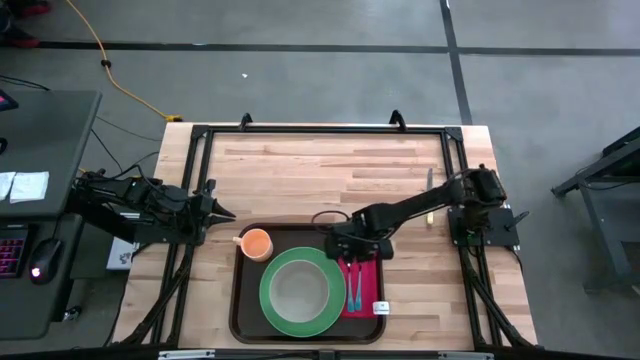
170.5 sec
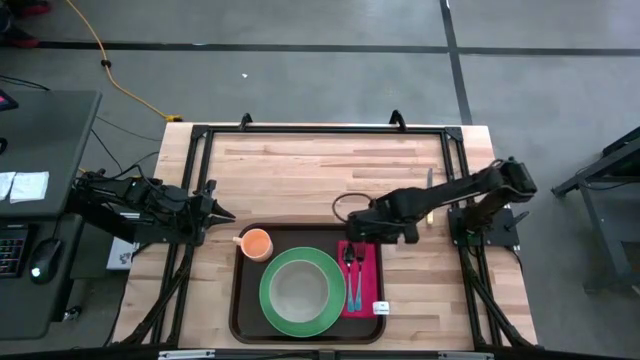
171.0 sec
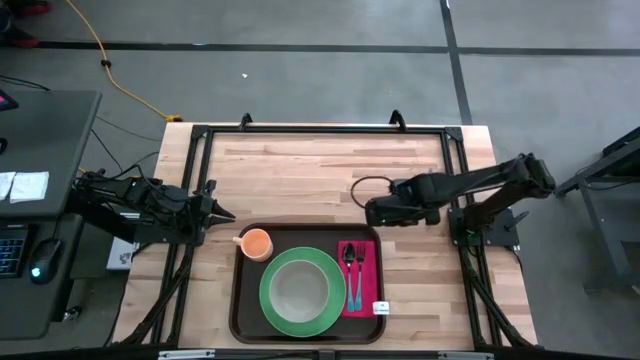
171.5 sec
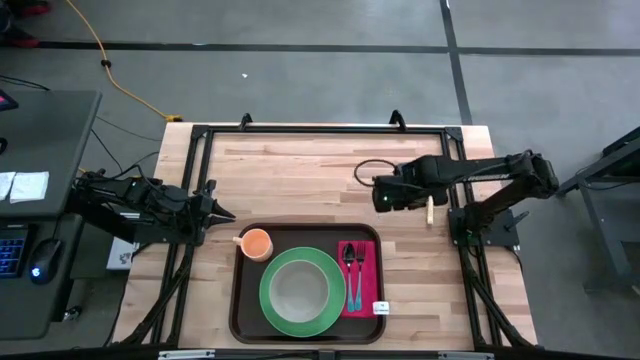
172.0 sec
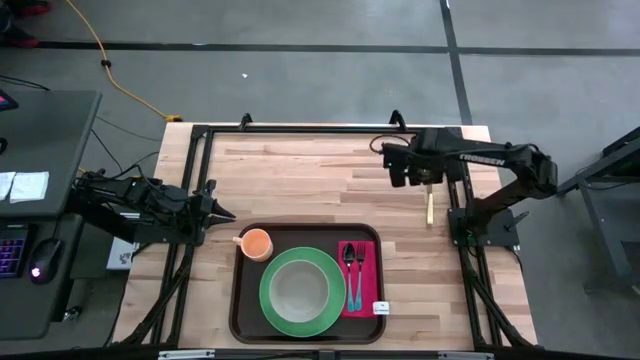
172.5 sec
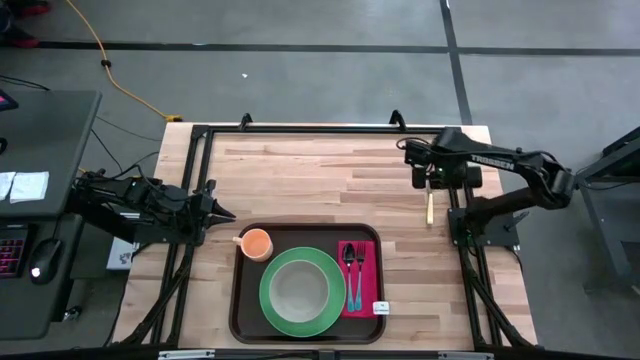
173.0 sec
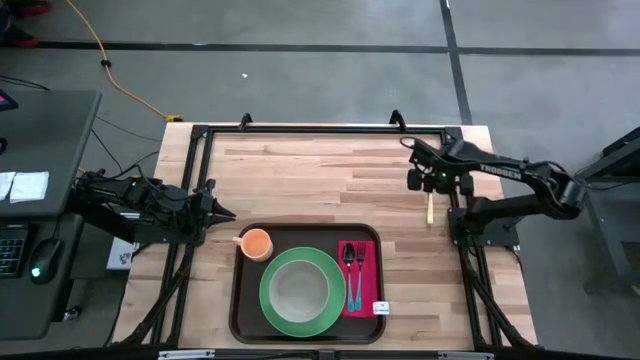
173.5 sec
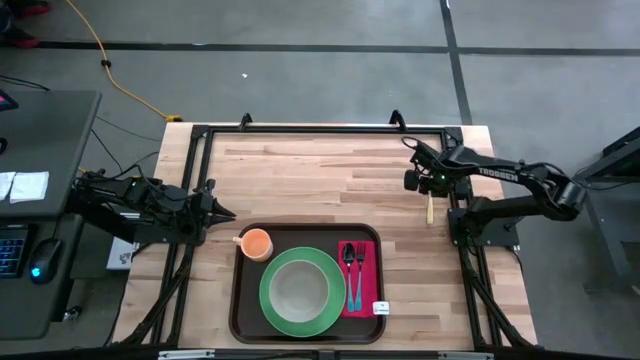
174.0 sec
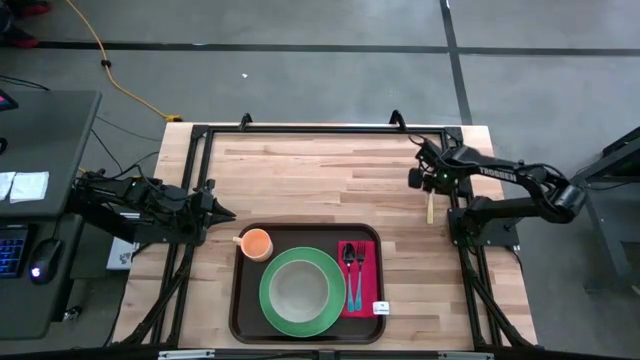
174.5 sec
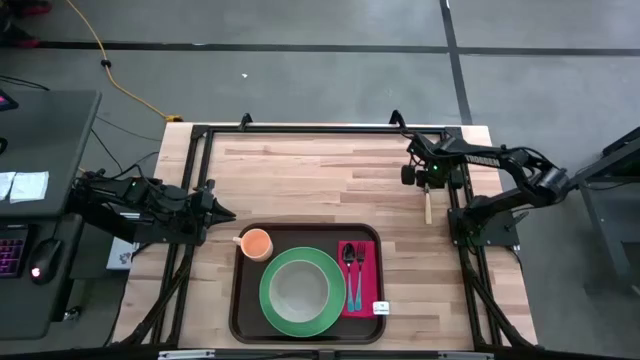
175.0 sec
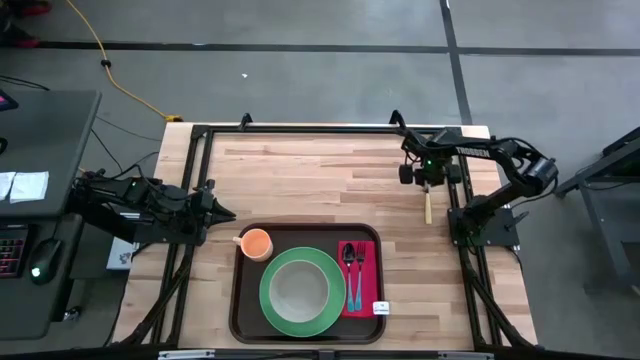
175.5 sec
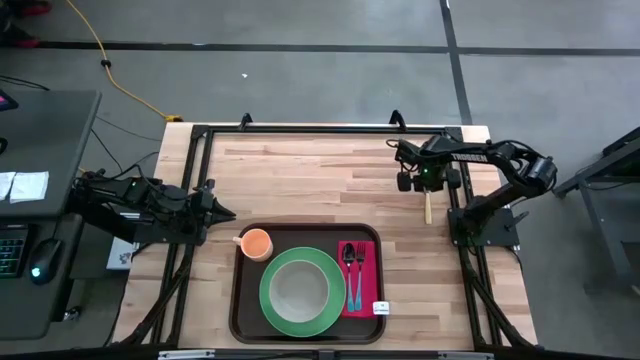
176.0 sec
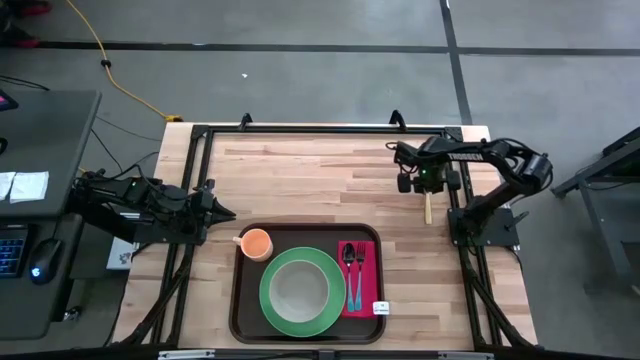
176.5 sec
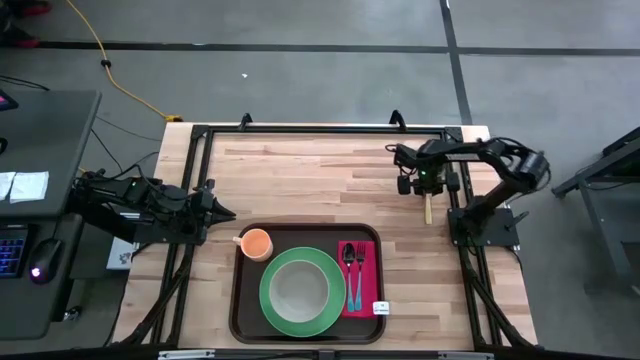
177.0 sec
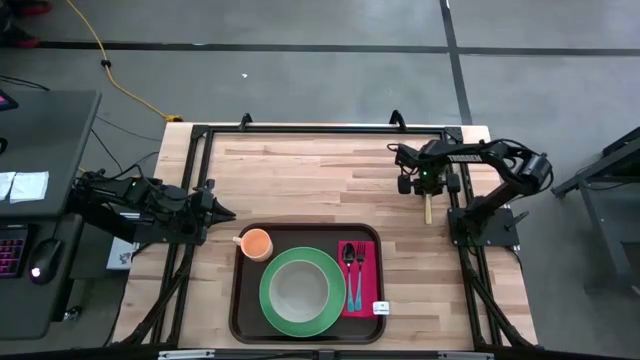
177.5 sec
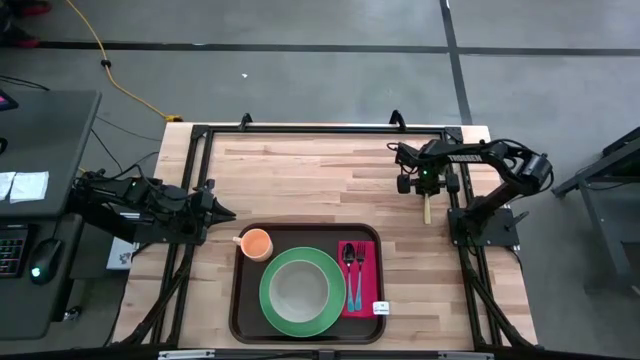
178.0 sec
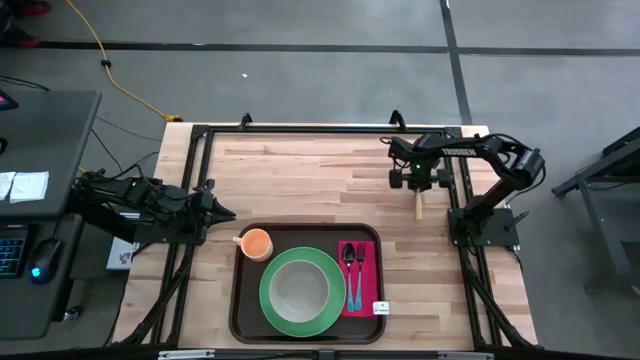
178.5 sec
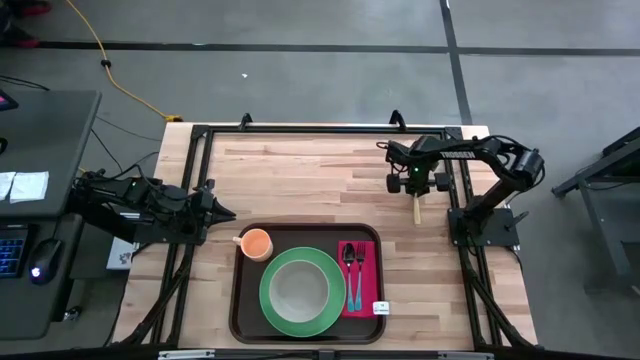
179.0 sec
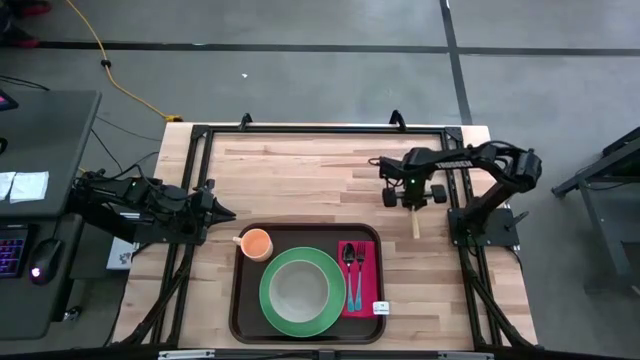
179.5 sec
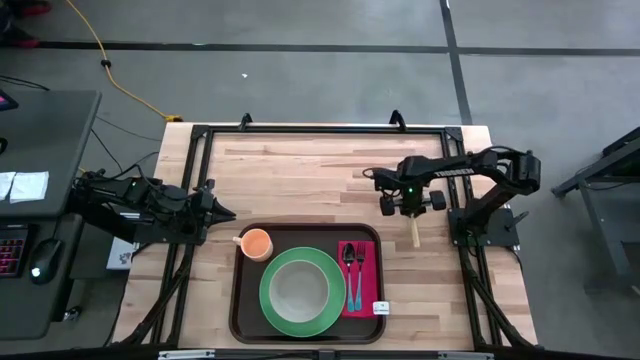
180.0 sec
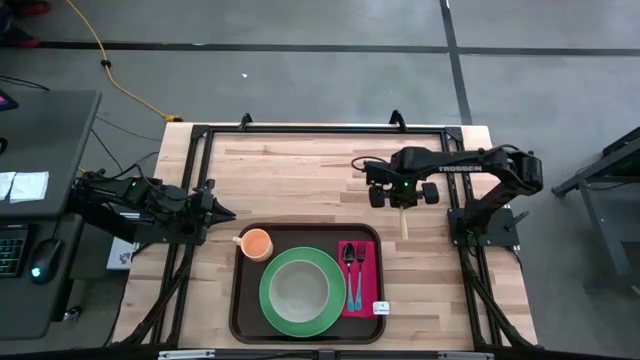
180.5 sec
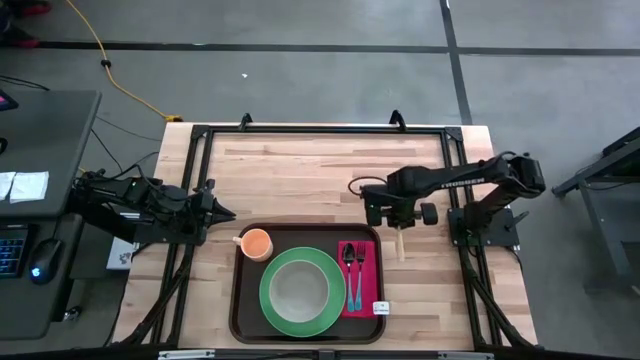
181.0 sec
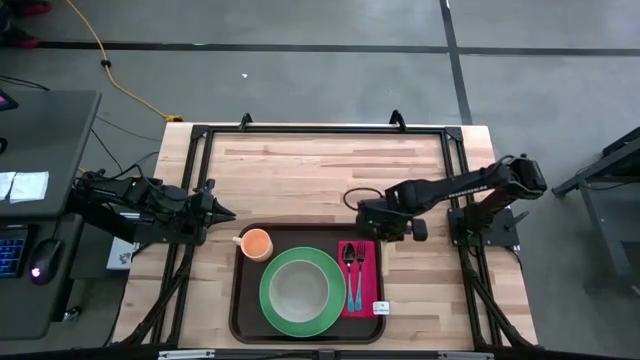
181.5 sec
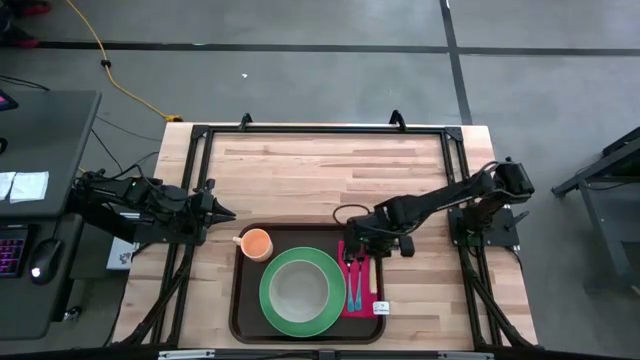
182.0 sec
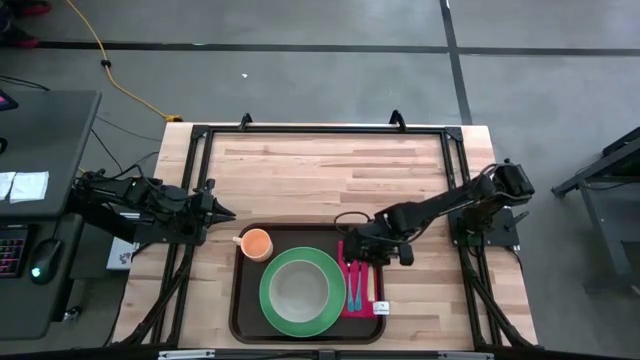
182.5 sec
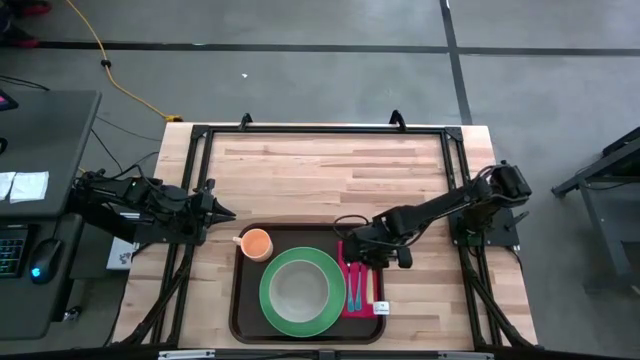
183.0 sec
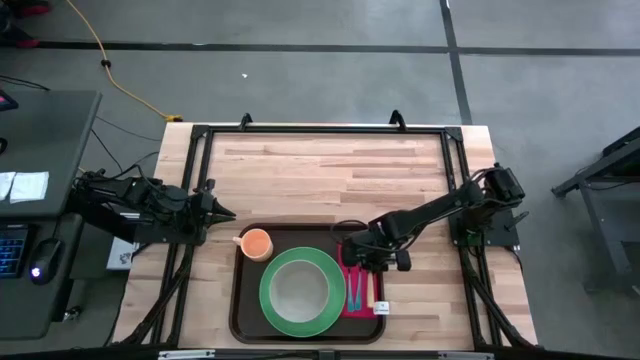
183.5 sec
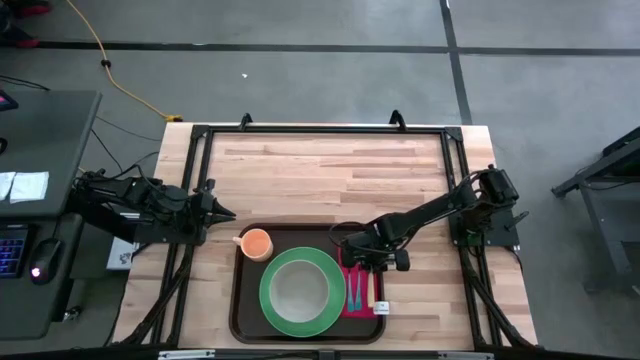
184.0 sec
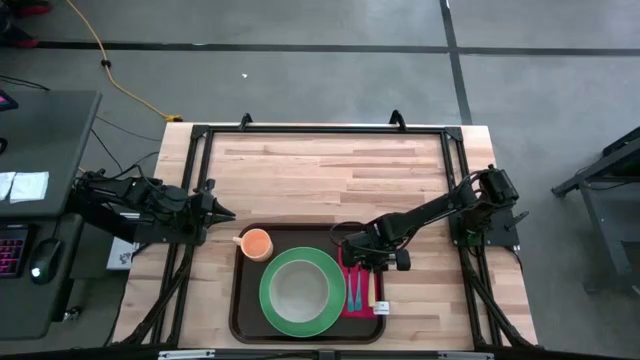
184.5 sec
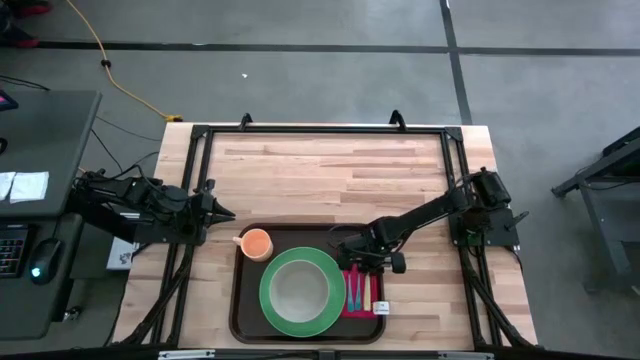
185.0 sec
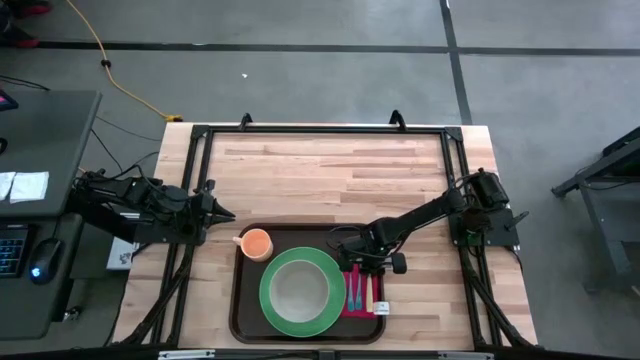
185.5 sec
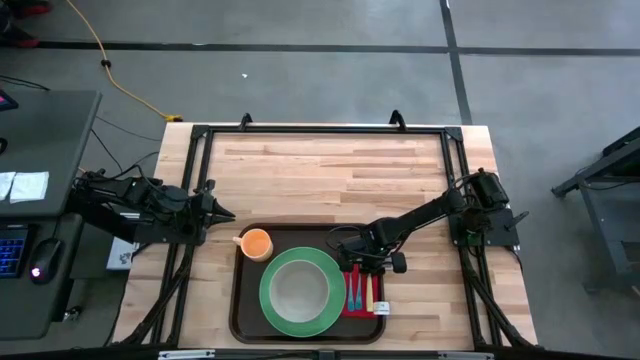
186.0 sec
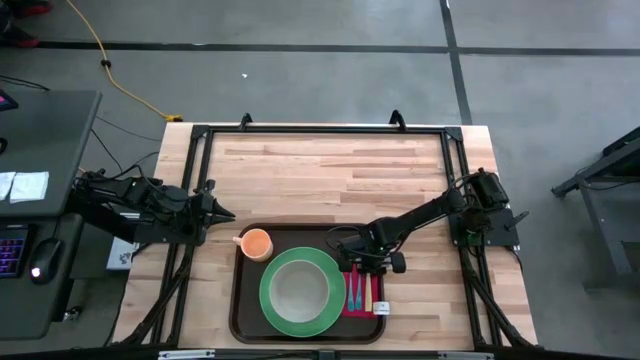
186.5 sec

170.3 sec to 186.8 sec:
Task: Set up tray
Put the yellow knife to the right side of the blue fork on the red napkin

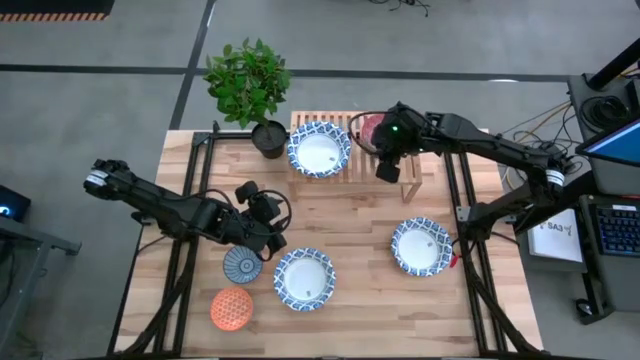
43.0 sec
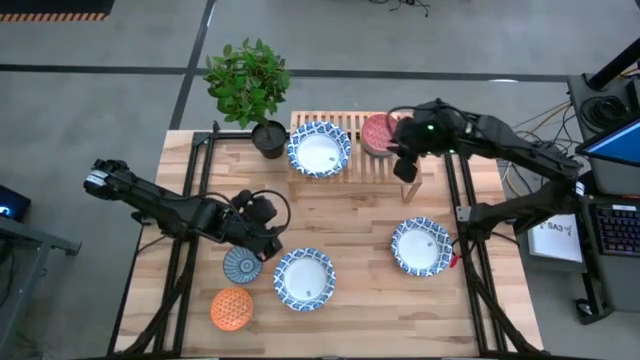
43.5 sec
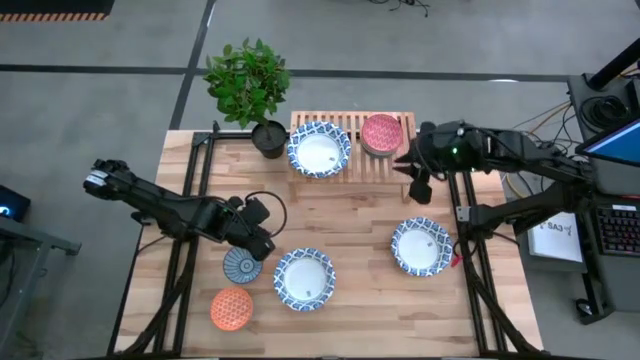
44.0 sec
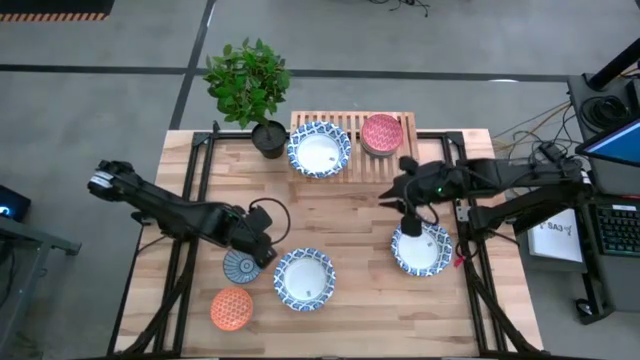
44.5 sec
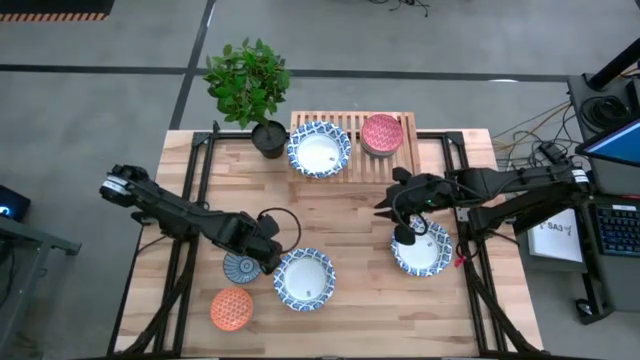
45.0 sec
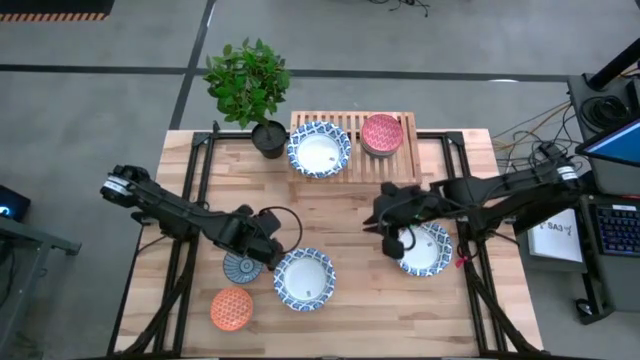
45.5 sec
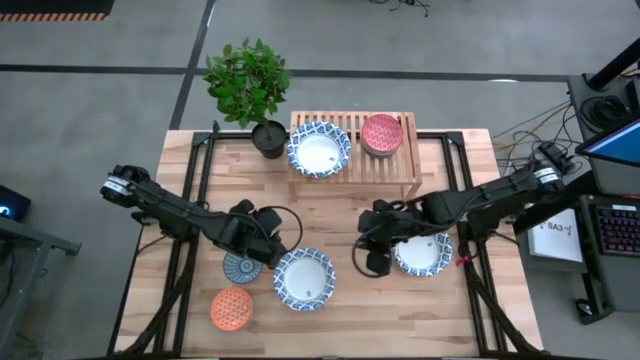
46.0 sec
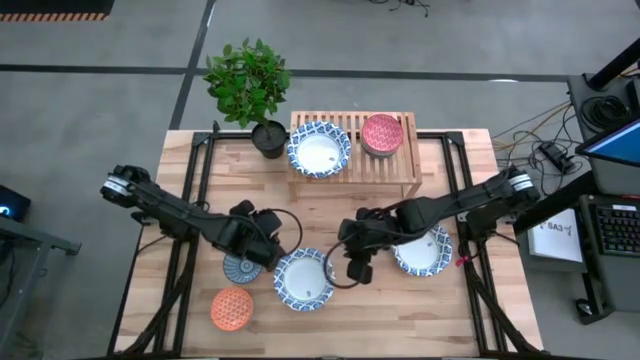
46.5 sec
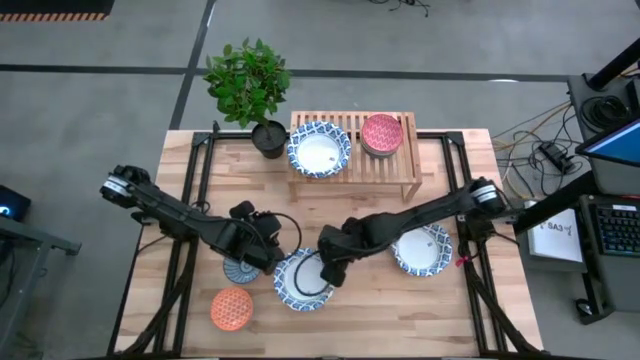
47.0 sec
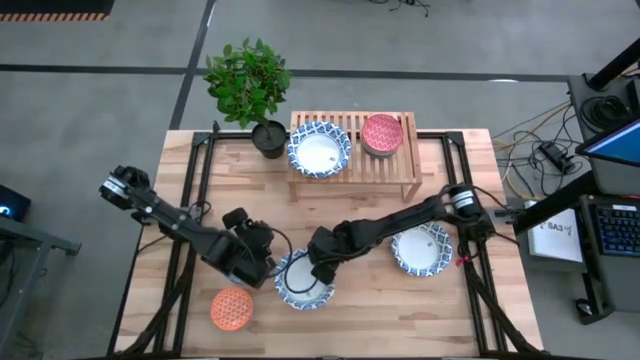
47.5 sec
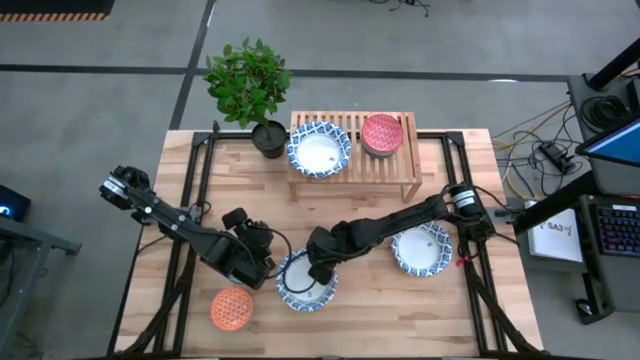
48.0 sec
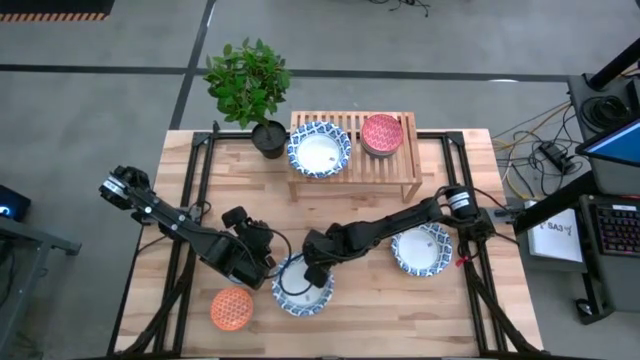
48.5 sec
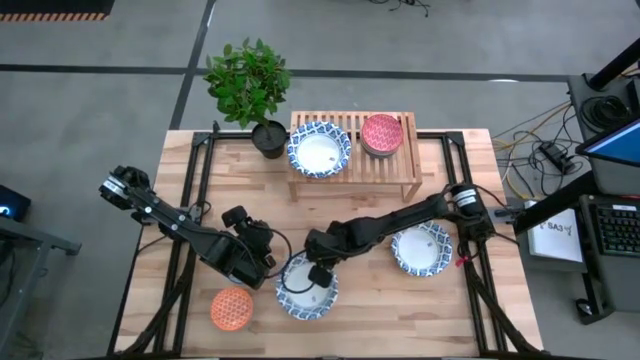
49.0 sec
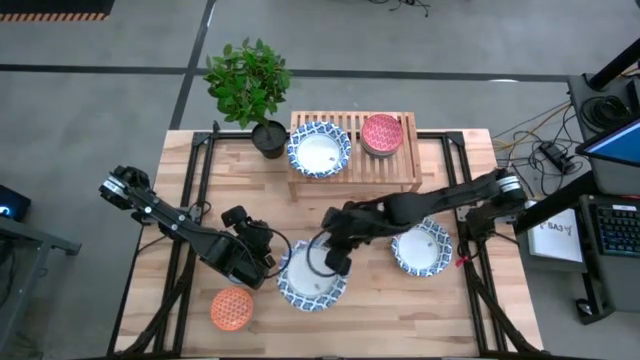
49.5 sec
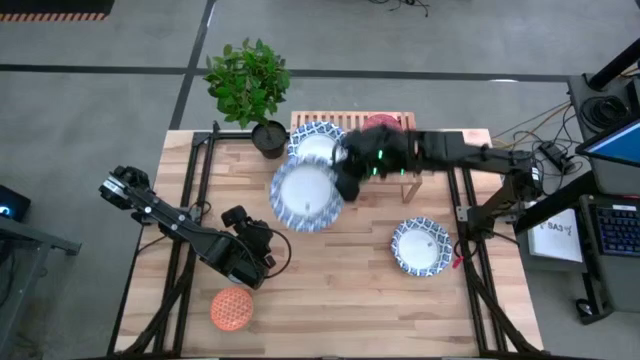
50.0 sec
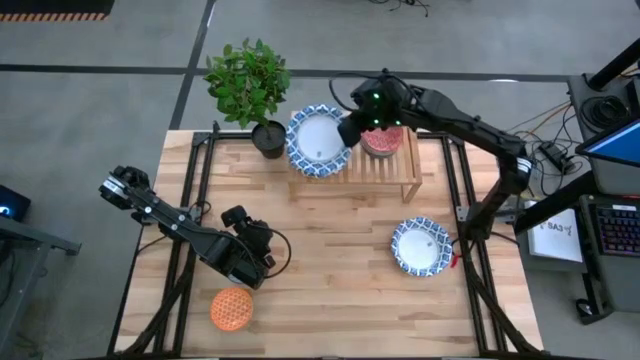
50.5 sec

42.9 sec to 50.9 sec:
Task: Place and stack bowls onto a shelf
Stack the left white blue patterned bowl on top of the other white blue patterned bowl on the shelf
